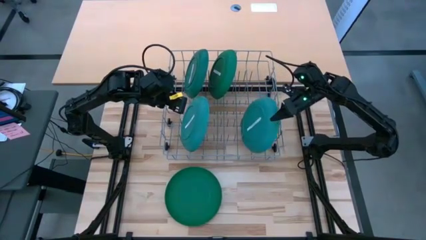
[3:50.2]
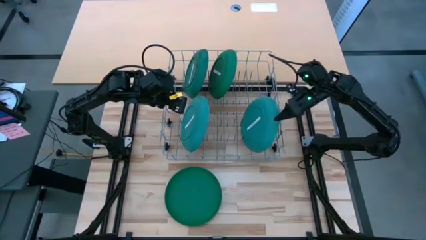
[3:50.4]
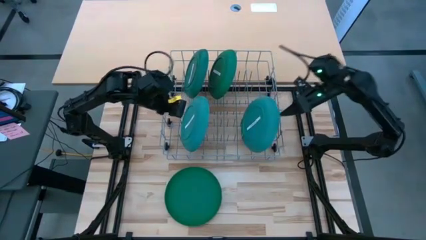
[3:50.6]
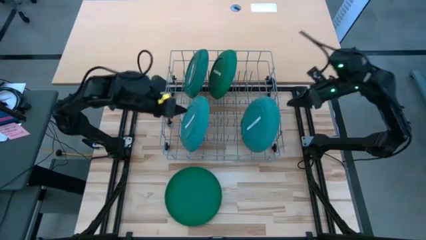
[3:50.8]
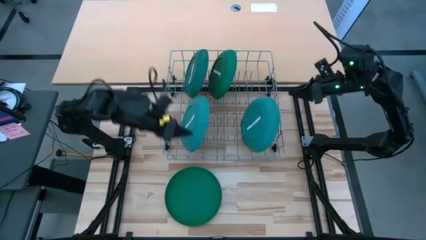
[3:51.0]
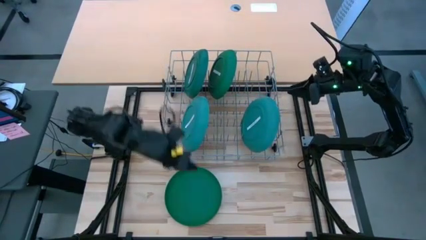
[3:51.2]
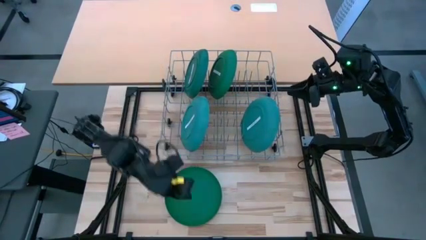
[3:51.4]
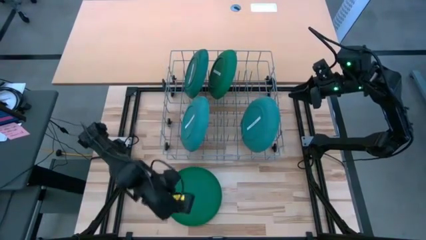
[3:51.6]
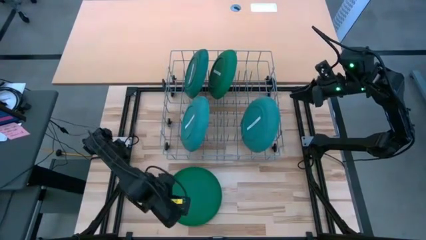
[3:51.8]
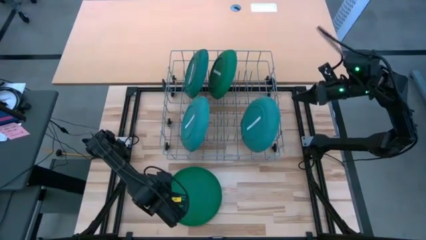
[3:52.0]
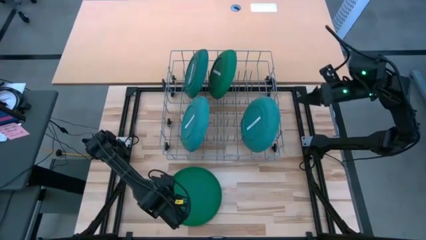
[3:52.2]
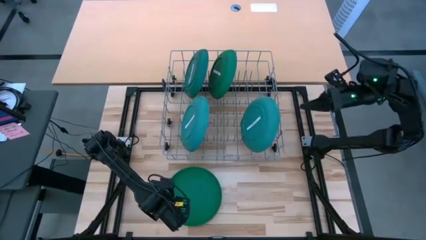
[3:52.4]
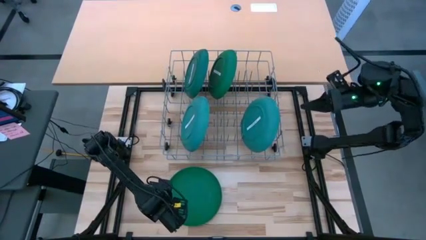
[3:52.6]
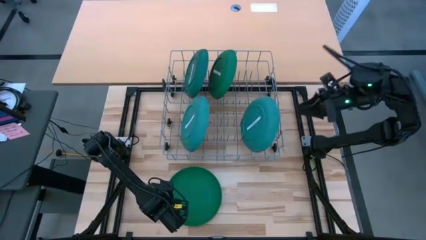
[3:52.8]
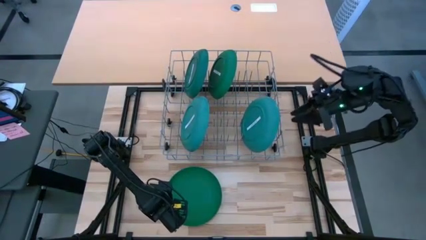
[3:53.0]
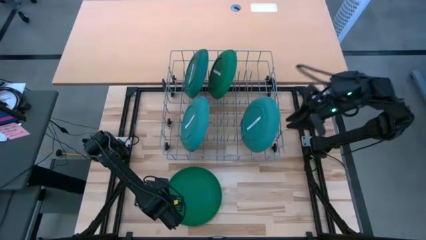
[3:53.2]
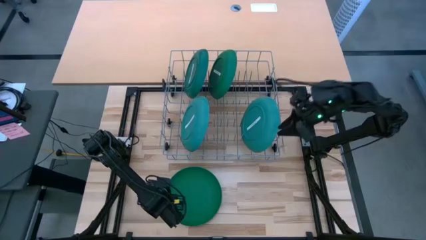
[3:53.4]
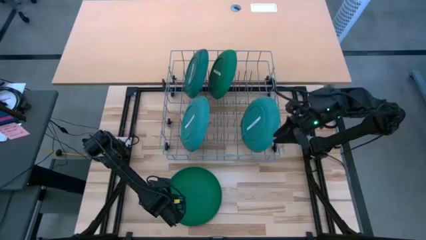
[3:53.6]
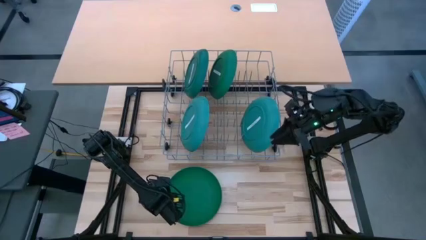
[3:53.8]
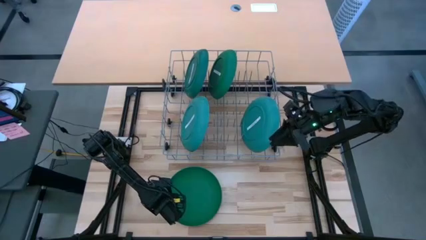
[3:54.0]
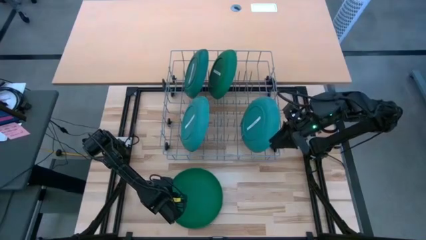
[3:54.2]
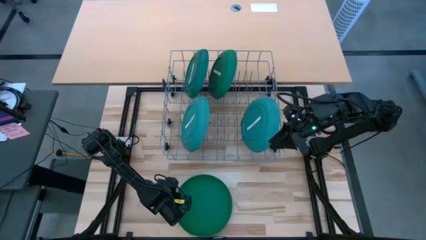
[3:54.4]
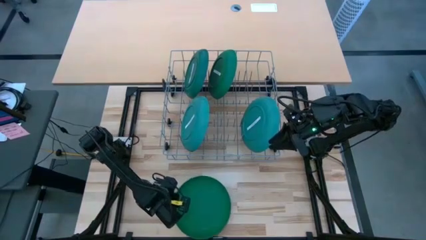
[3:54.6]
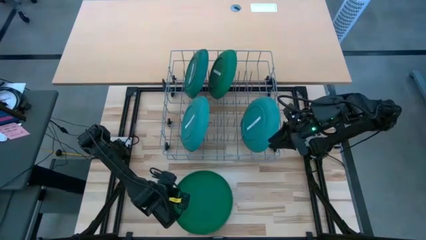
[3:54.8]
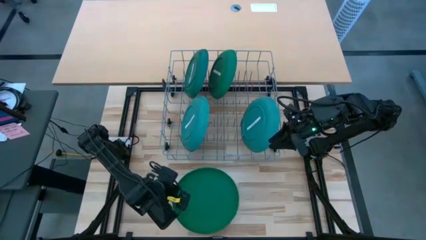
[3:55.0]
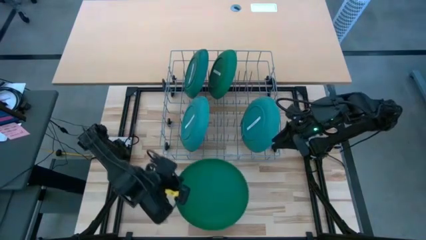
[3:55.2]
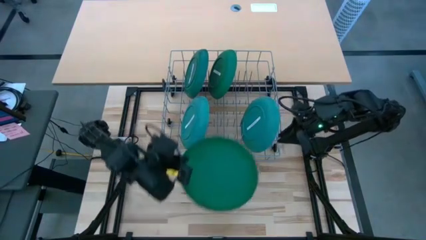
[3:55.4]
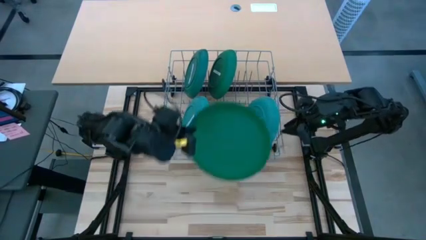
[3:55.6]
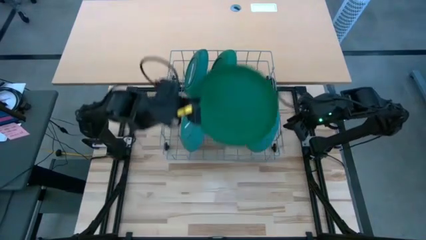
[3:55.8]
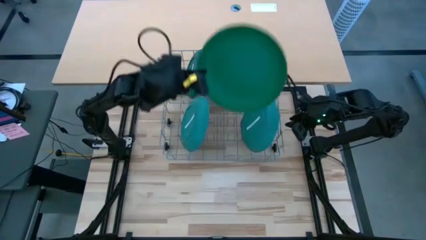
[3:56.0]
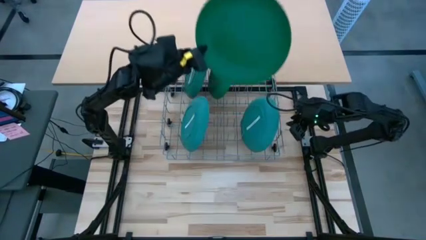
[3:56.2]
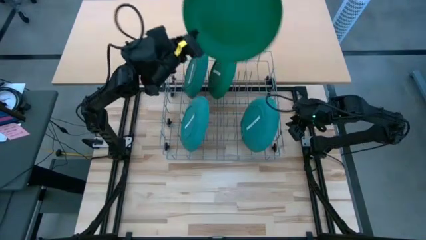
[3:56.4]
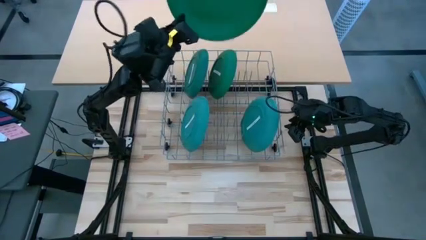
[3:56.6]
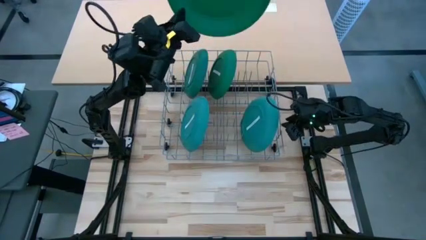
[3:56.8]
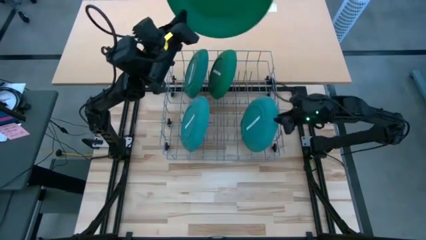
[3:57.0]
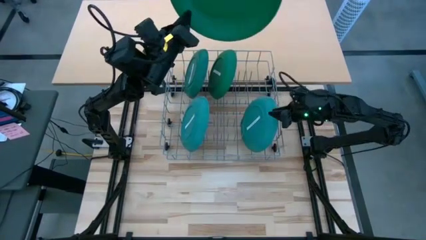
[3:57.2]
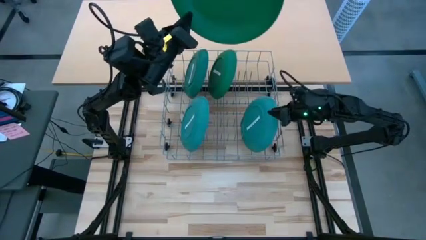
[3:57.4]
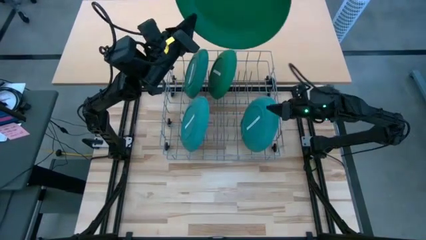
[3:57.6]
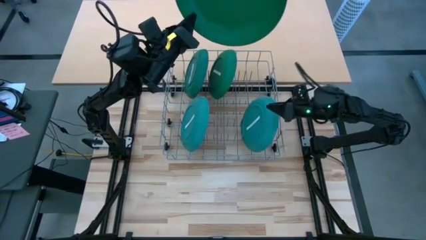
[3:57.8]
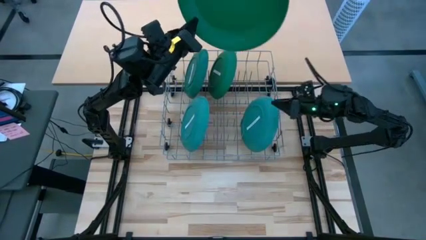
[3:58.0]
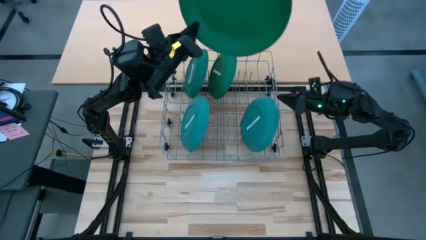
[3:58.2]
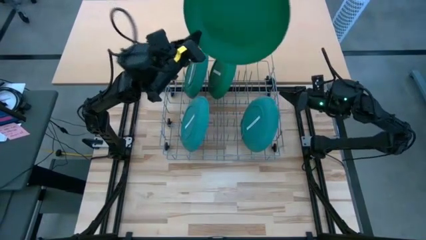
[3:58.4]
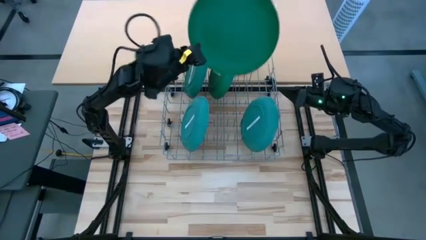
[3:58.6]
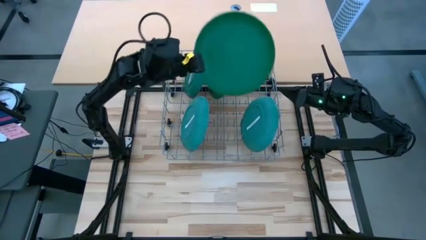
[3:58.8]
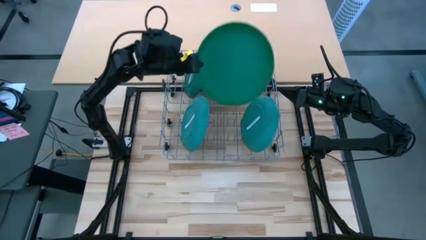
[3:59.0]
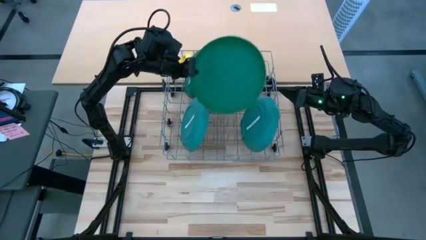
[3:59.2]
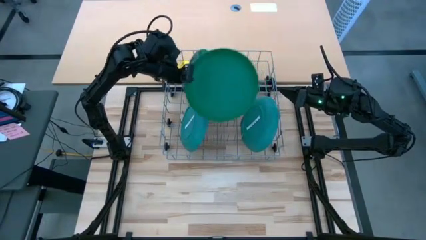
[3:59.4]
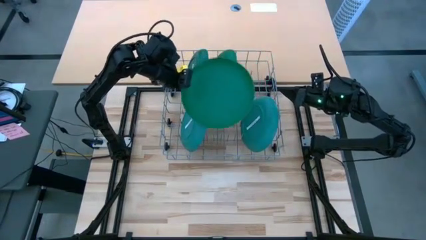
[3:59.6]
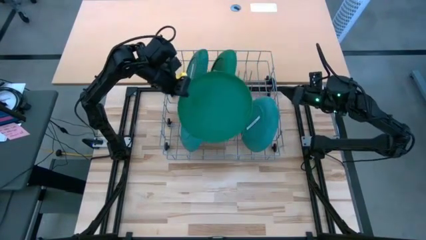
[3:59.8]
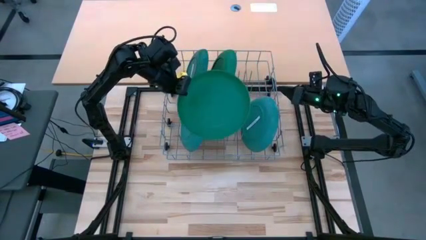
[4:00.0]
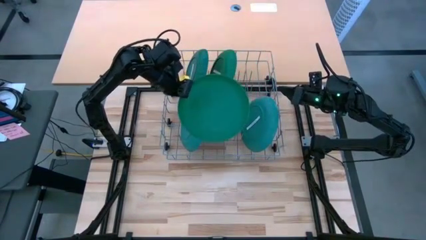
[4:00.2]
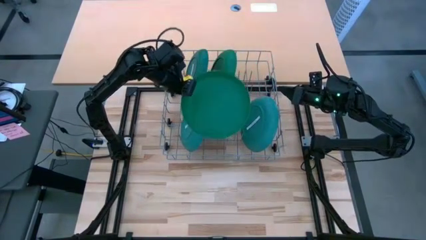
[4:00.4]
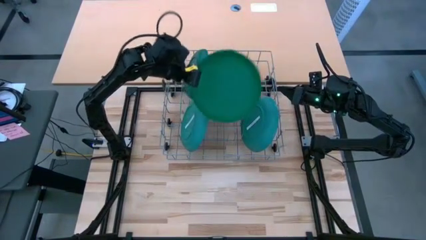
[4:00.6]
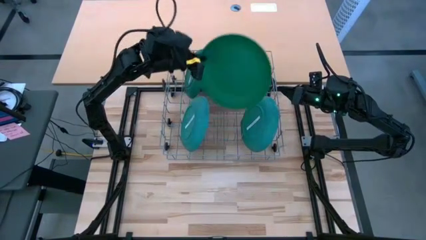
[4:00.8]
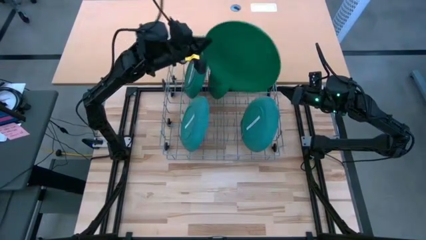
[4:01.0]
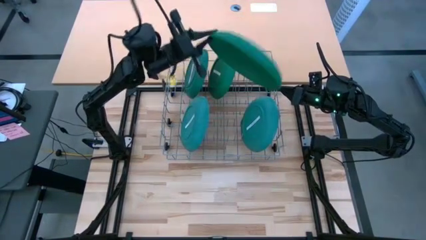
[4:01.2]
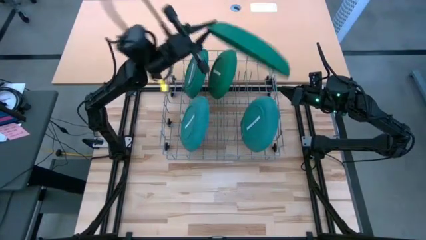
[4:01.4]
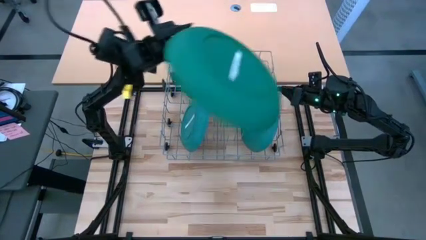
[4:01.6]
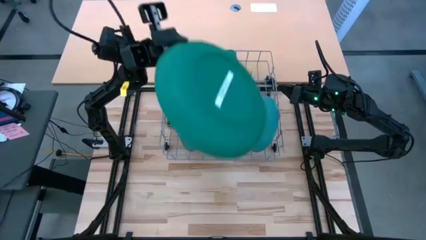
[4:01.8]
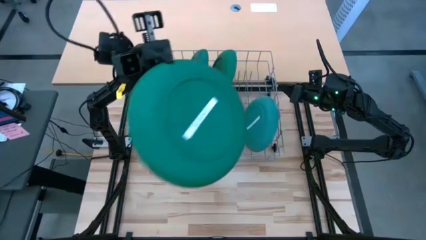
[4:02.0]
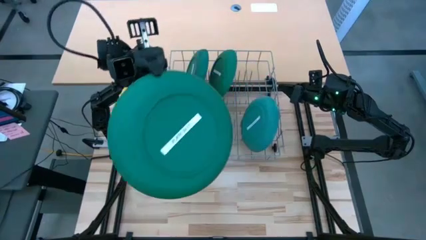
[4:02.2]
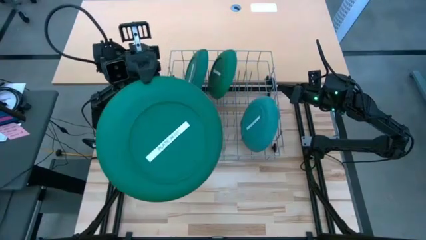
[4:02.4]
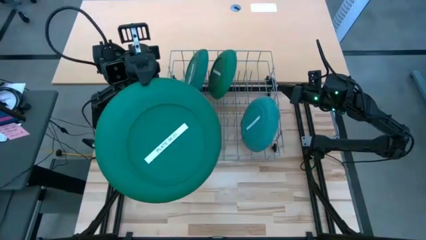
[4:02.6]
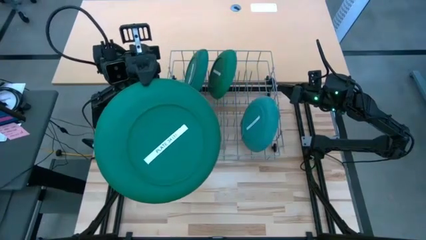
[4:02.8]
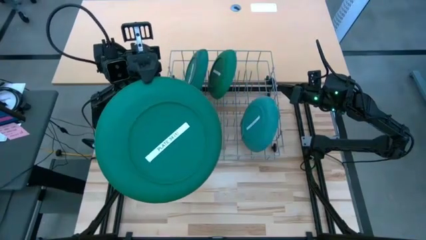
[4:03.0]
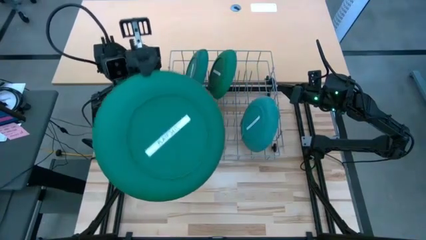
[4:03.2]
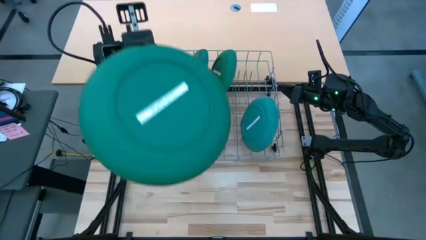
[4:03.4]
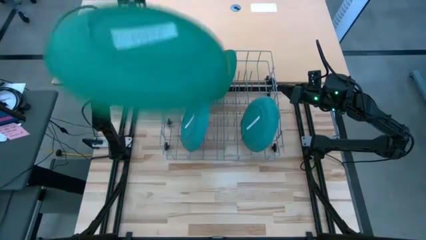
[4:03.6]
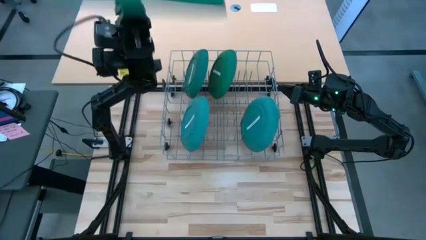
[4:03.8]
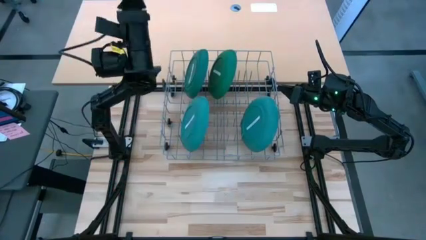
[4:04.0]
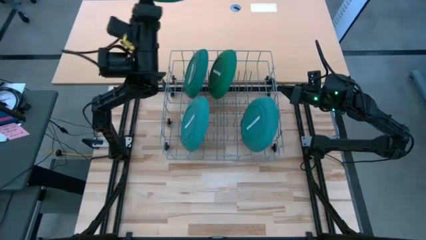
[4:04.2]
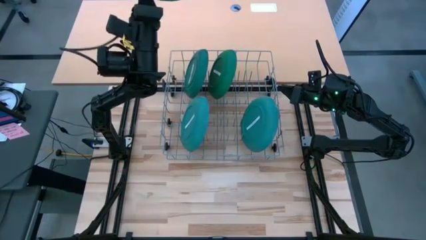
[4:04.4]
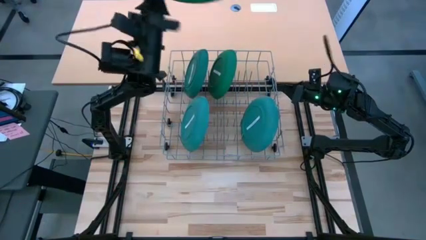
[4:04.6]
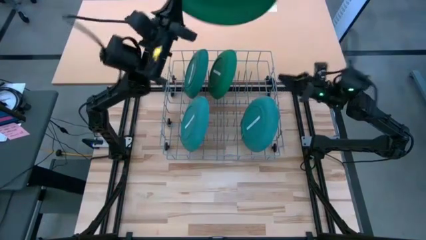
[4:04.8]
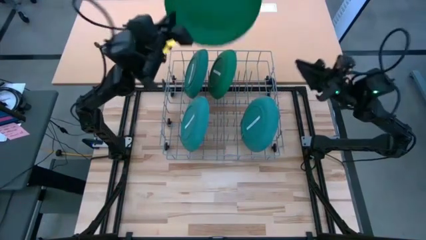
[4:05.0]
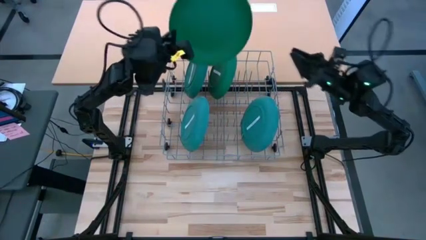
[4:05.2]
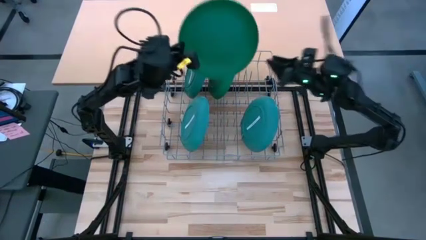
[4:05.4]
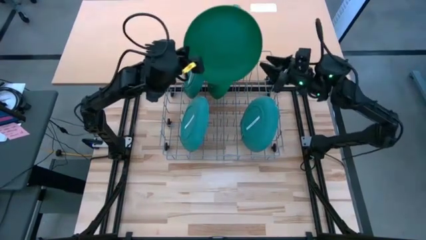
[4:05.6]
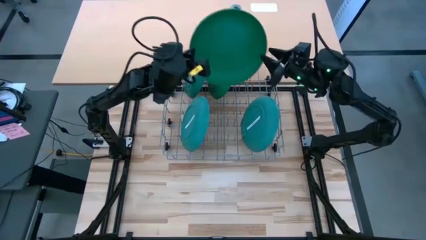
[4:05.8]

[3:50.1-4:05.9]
Task: Sort dishes
Put the green plate into the dish rack

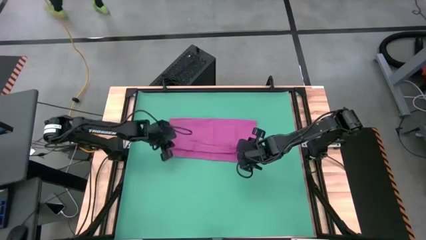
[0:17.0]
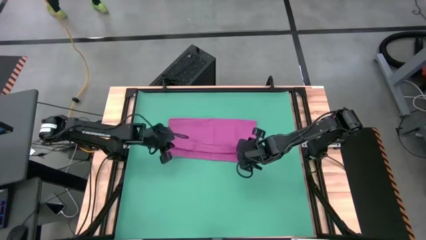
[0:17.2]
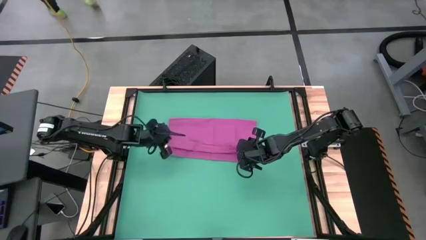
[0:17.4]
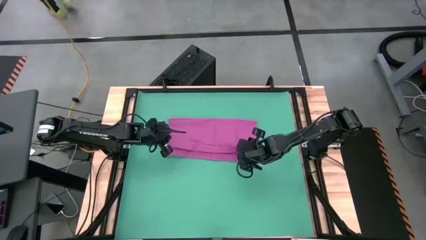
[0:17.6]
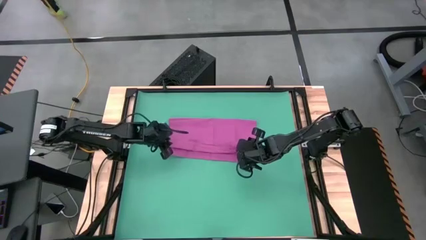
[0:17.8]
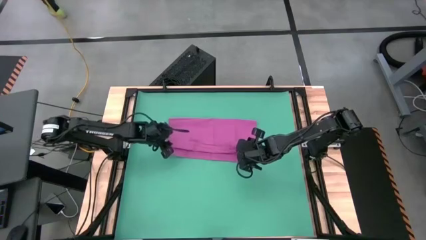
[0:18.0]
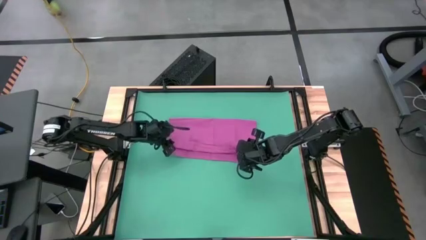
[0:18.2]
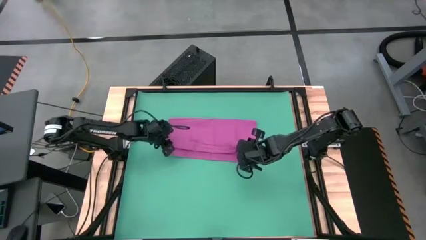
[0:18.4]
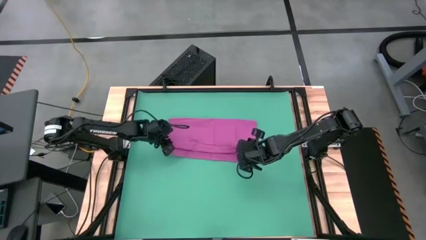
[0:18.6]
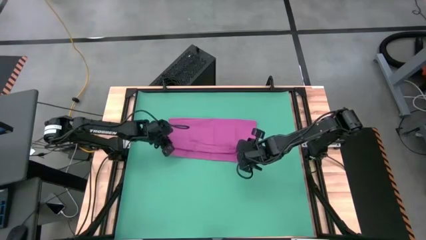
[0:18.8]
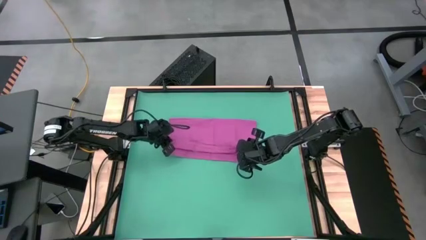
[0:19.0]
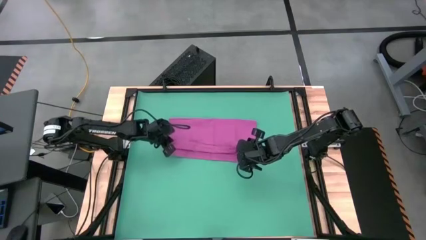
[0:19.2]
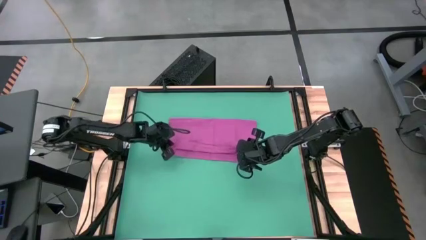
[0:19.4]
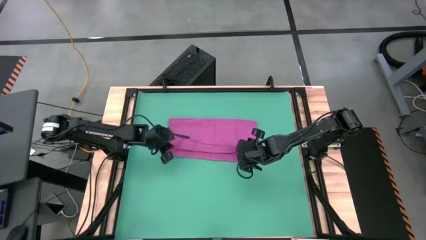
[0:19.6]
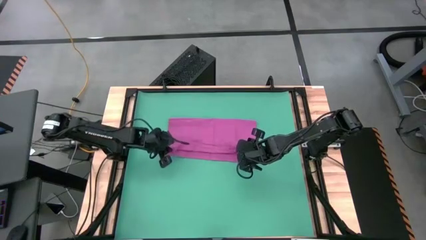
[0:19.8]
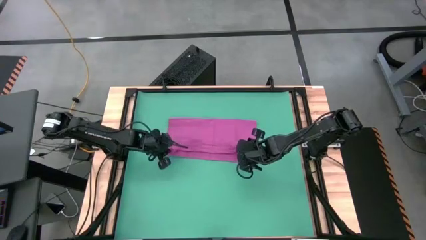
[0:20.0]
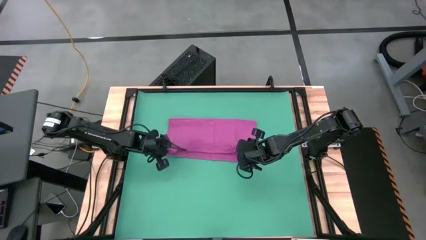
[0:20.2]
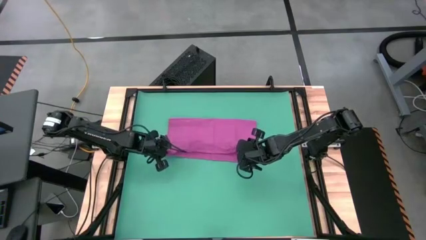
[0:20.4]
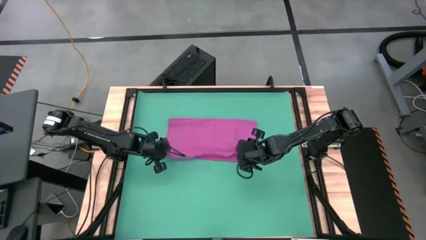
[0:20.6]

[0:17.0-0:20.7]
Task: Roll towel
Fold the pink towel
